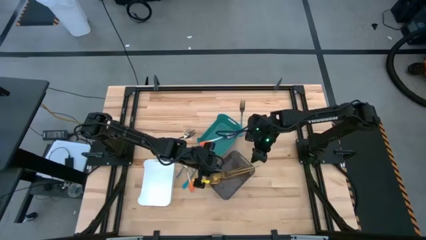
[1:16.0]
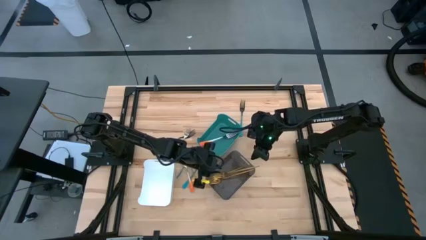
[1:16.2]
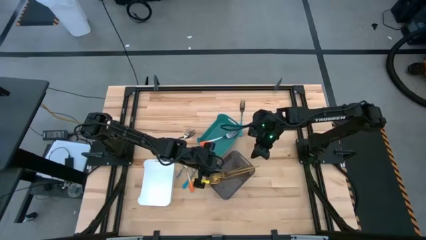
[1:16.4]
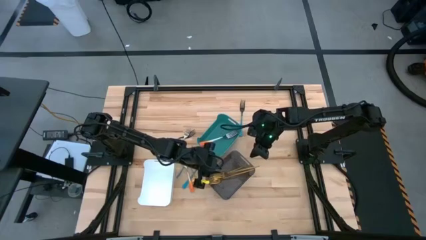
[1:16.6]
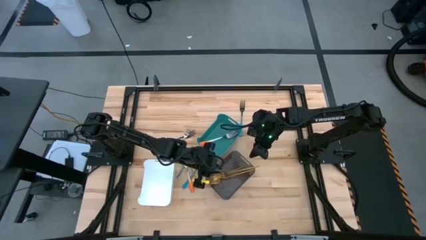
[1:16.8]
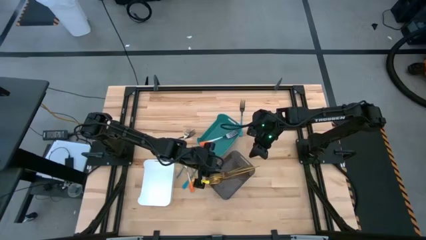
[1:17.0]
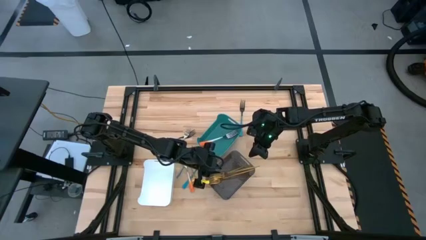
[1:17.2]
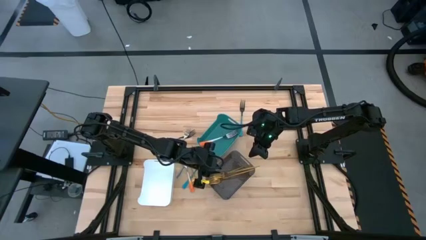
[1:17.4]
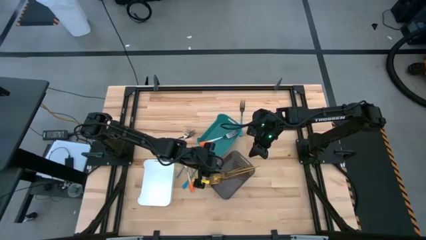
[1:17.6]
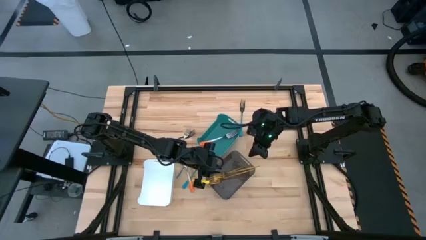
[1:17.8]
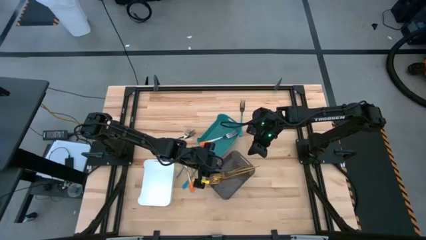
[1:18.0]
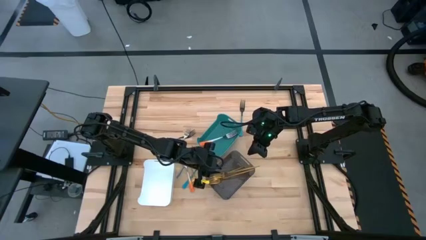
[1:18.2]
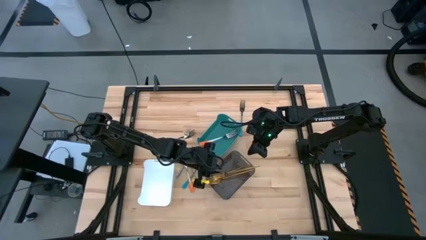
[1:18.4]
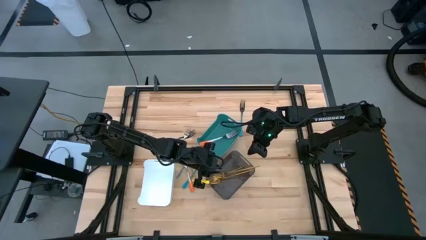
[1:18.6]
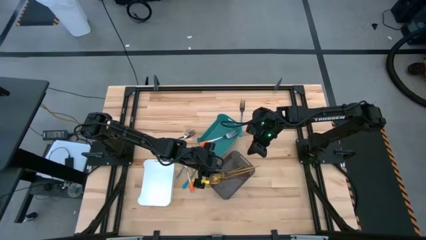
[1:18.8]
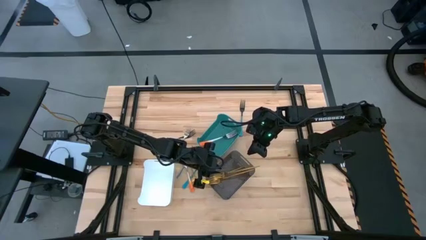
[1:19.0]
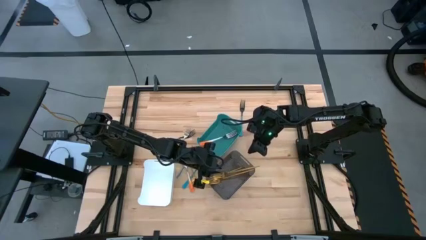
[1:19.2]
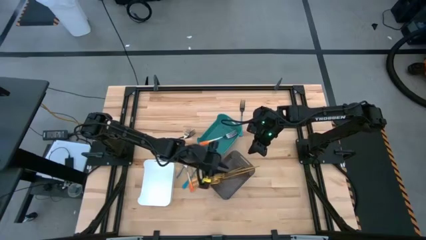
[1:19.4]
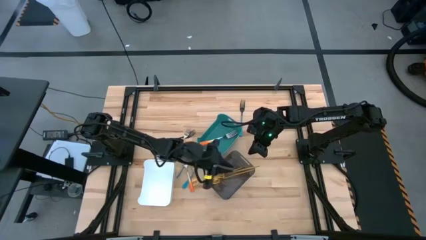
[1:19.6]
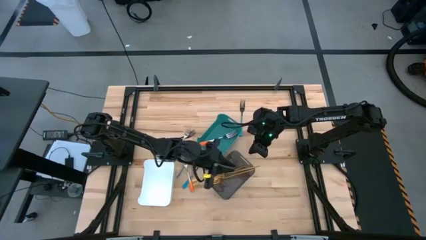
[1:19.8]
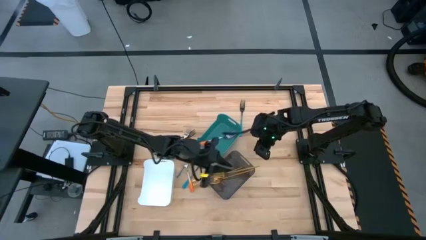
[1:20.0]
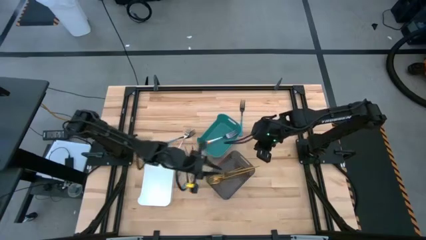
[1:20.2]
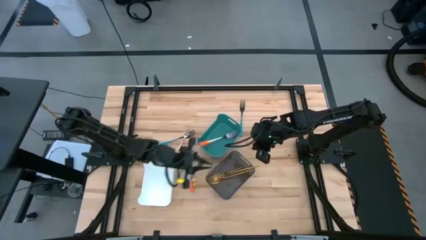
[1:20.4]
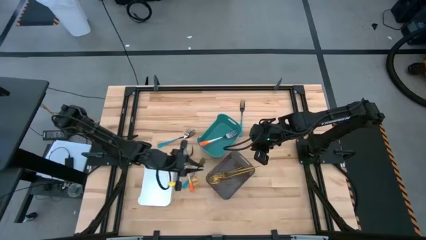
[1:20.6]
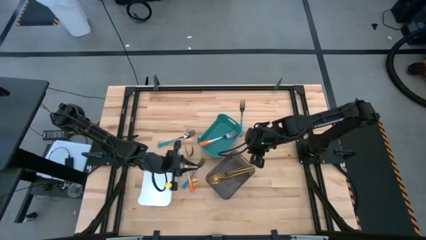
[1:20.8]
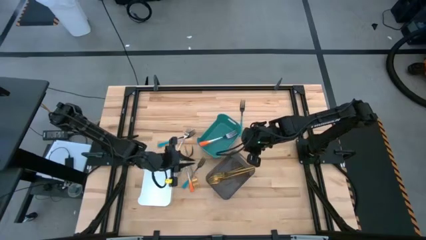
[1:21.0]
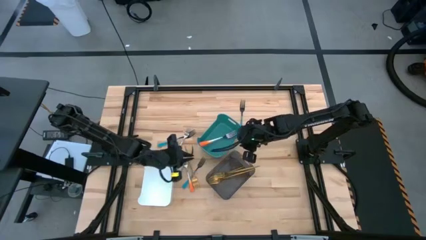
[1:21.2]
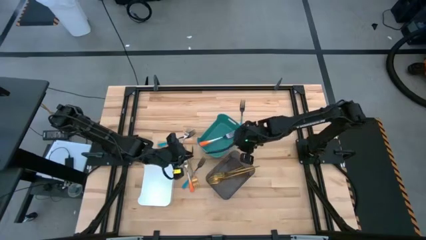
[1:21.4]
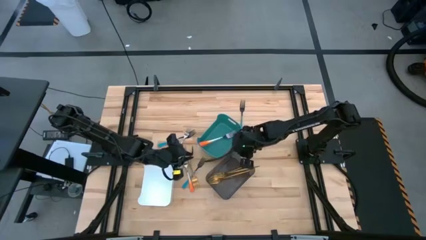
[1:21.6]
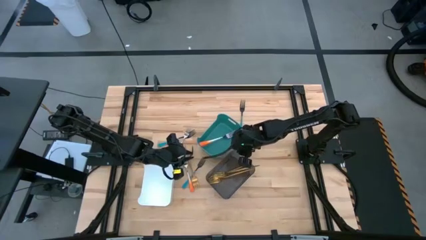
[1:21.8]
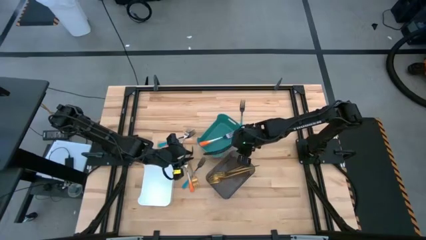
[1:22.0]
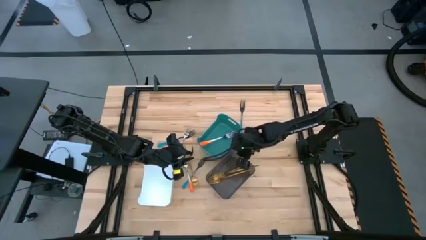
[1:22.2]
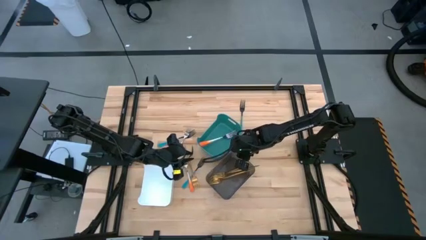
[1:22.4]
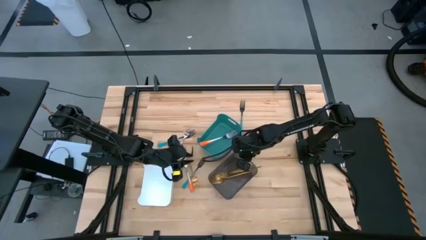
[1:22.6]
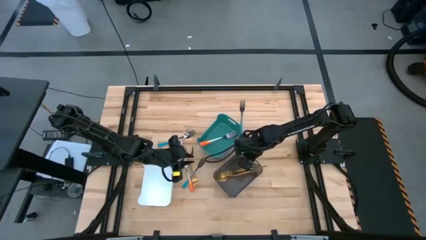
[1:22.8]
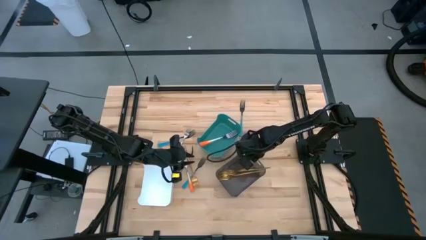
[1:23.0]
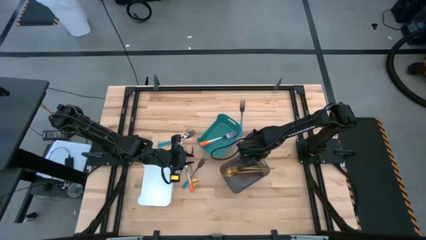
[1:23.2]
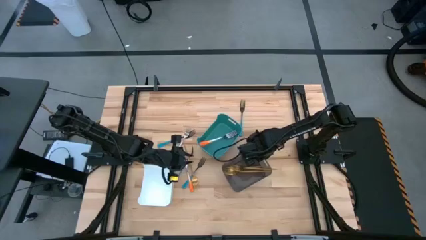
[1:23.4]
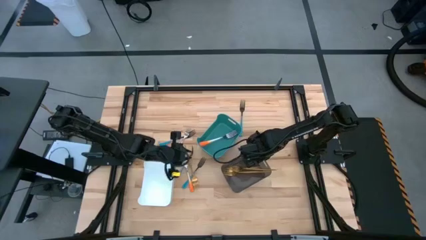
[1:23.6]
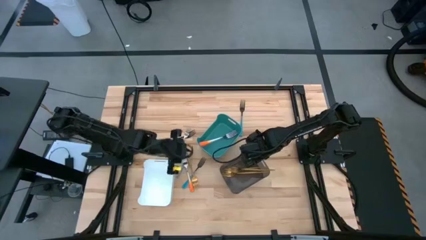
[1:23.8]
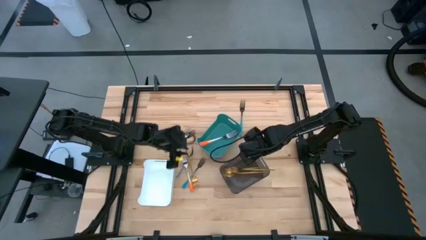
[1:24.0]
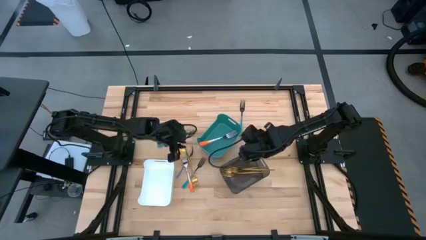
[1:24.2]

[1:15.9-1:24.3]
Task: Sort silverware by color (type)
Adjust the black transparent bin

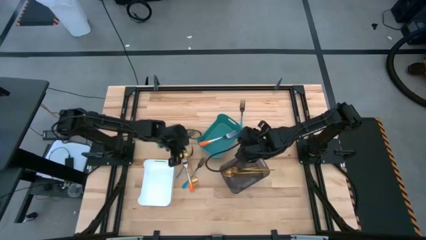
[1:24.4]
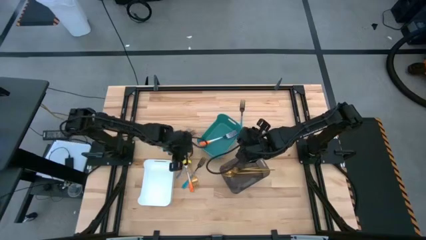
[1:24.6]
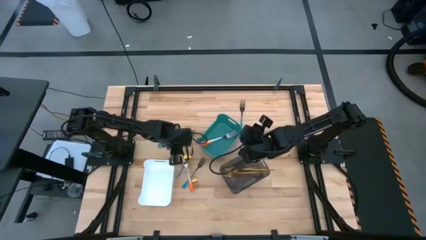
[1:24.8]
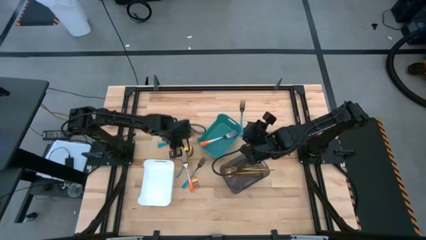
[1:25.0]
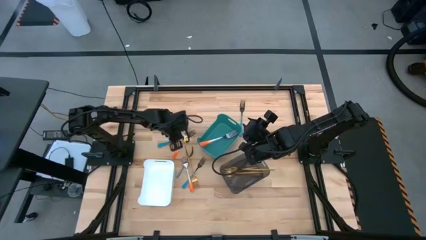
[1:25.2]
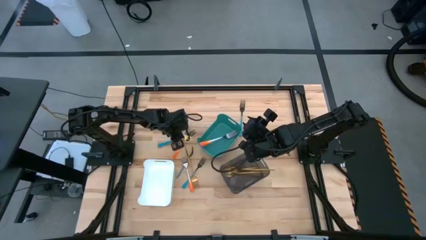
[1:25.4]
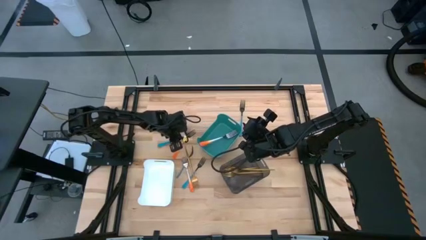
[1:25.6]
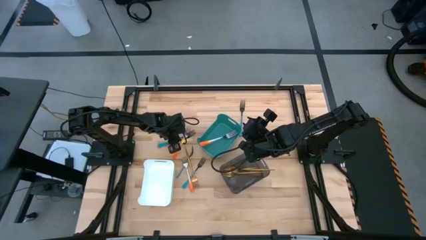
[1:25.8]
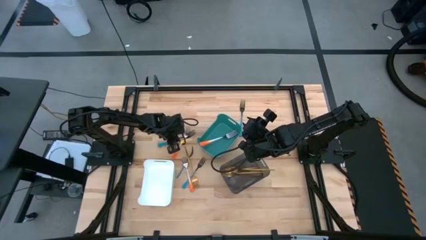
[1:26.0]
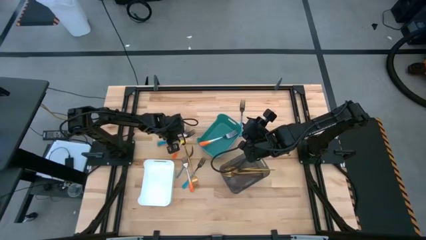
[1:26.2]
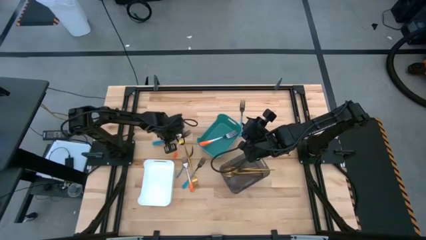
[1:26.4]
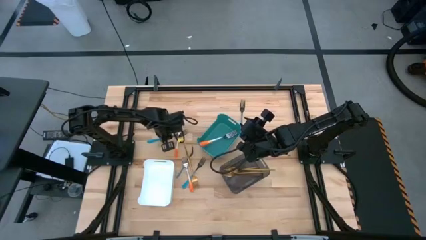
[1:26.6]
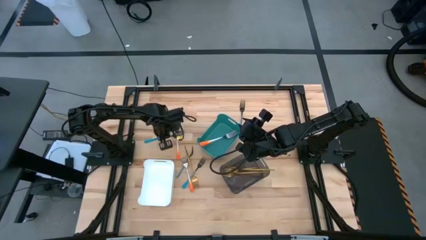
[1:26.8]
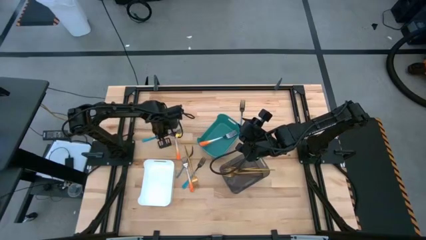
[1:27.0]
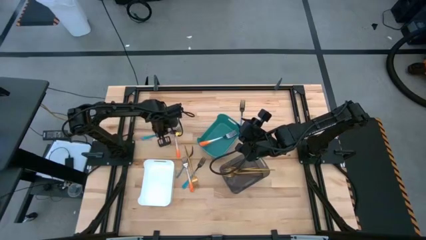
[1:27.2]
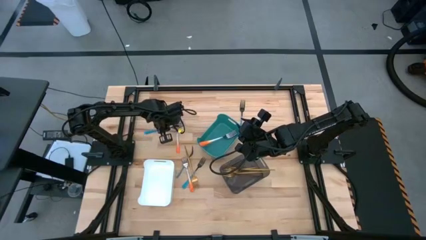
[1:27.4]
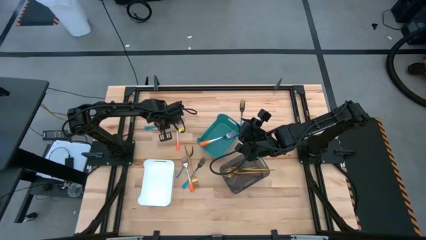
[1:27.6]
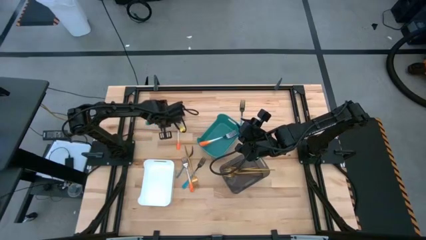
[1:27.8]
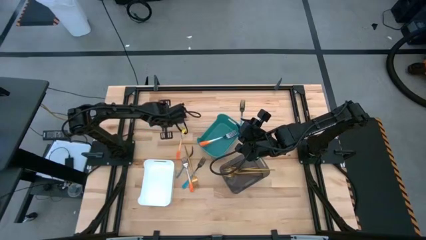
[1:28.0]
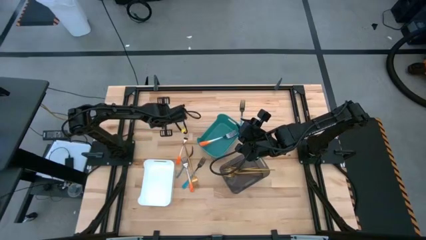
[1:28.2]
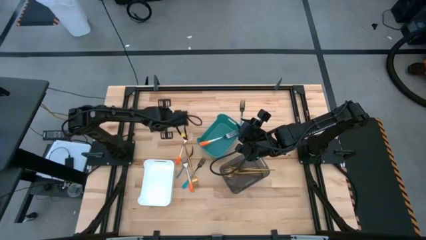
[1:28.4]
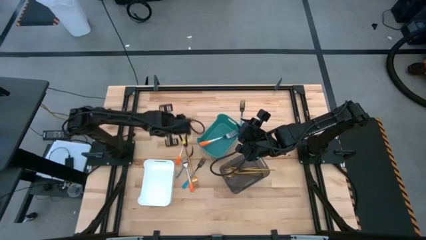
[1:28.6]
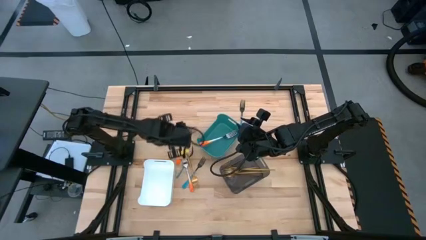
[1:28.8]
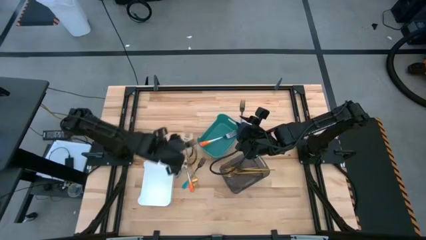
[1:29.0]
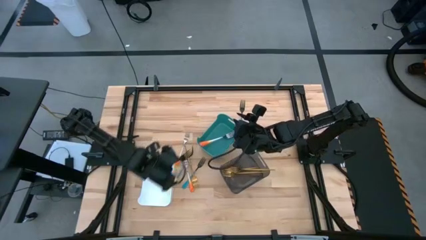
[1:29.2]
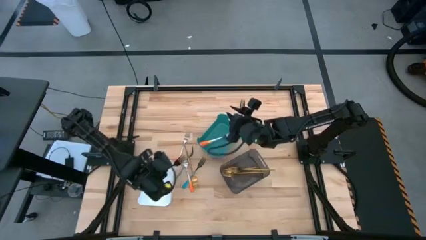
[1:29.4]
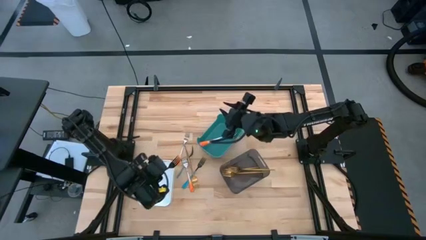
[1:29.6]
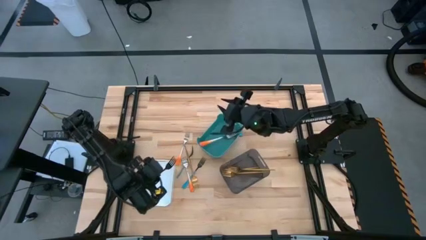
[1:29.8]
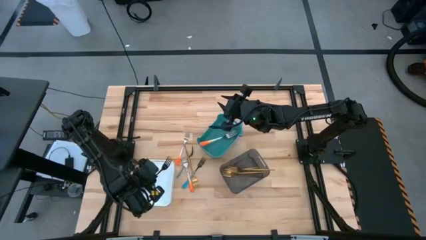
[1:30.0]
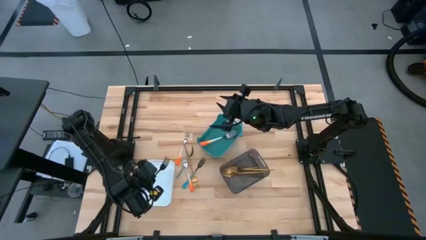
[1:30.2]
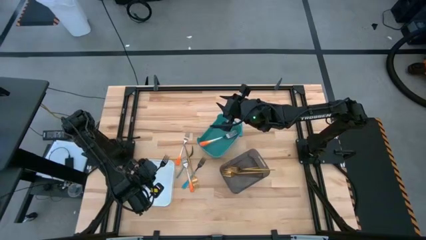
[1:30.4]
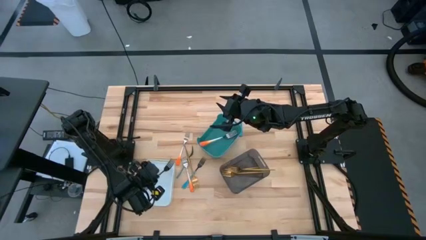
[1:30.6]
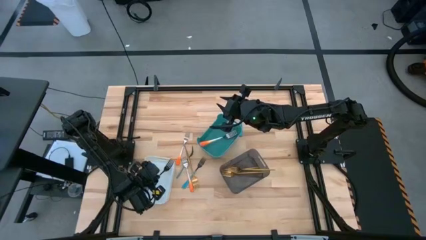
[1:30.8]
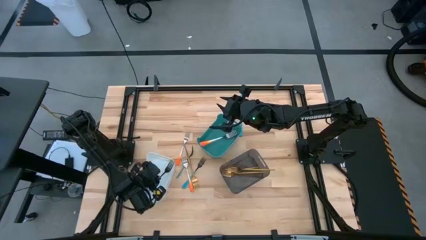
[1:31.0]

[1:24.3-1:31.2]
Put the blue silver fork into the white bin

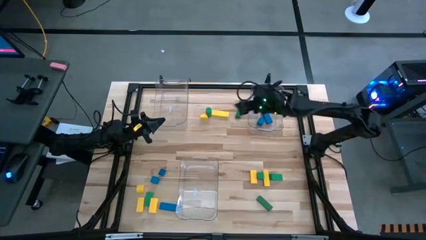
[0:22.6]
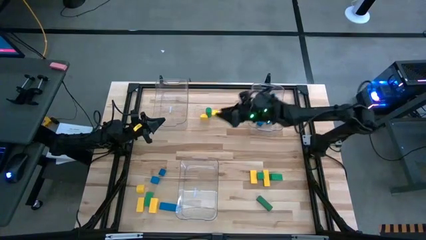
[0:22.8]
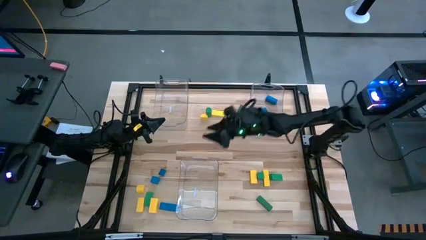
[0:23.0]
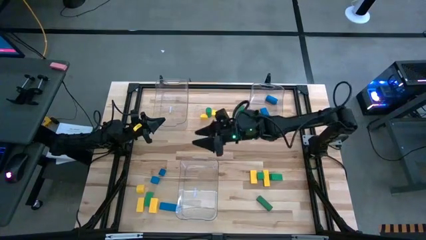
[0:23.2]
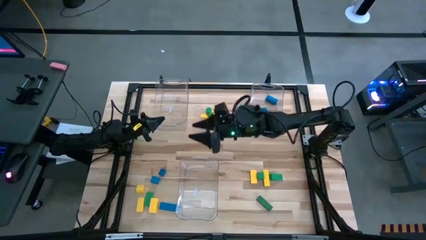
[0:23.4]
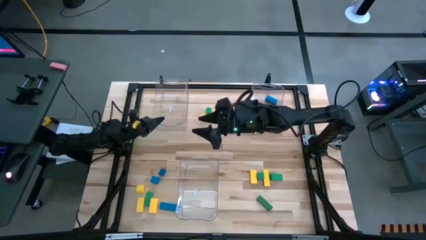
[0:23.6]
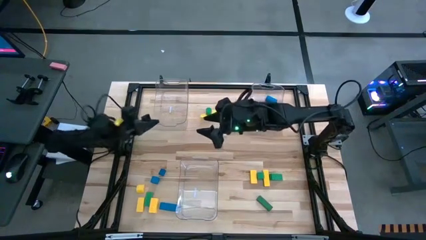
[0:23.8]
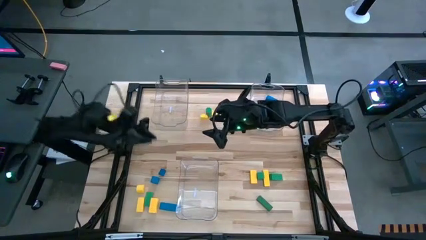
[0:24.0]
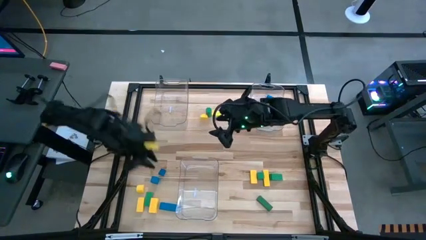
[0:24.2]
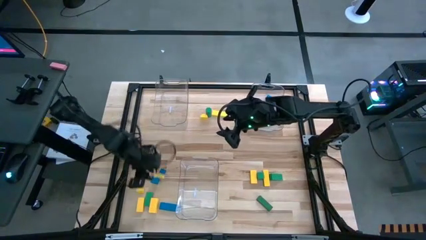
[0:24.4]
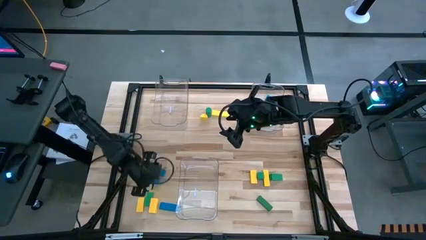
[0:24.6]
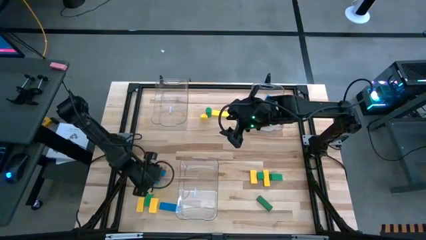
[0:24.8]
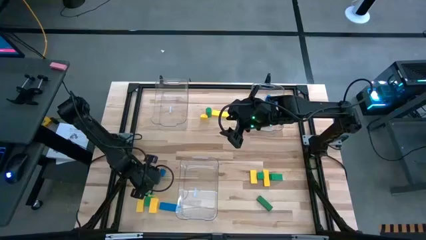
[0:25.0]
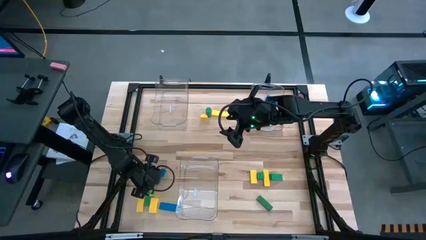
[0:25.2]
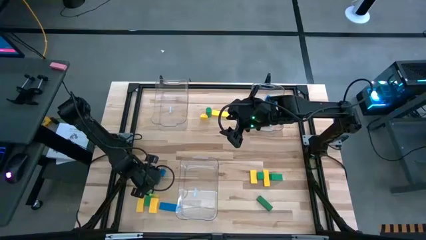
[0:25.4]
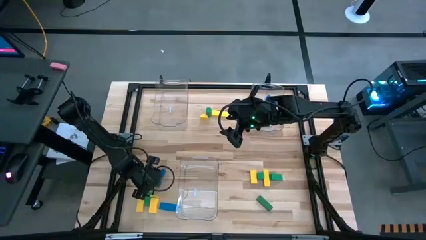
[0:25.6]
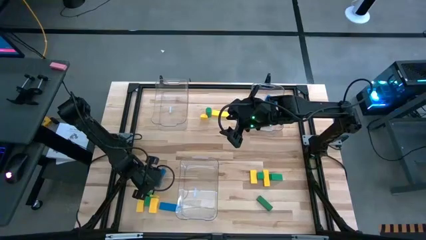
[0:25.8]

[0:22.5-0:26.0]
Task: Sort blocks
Put the blue block into the top right transparent bin
